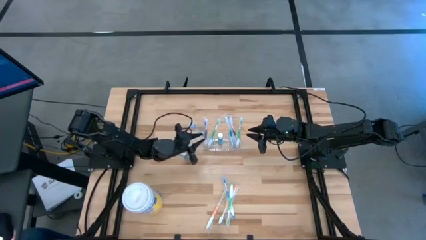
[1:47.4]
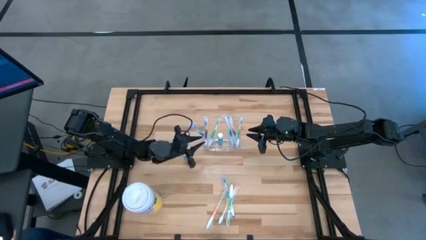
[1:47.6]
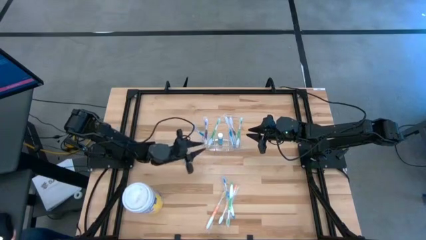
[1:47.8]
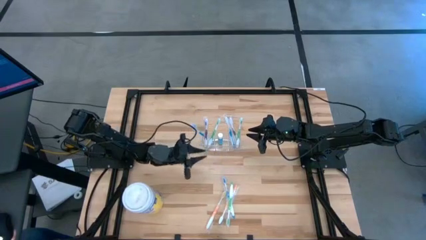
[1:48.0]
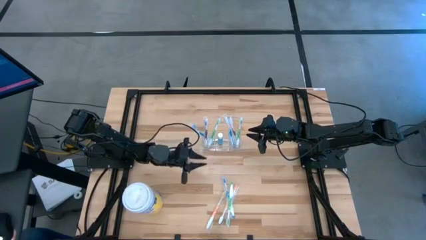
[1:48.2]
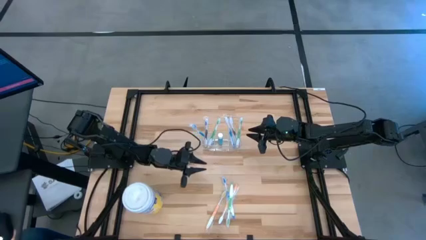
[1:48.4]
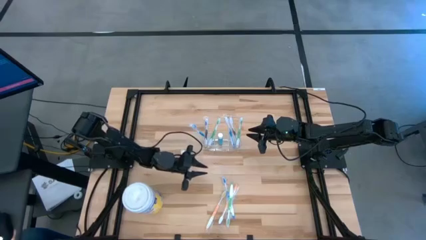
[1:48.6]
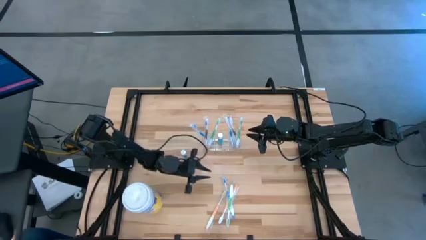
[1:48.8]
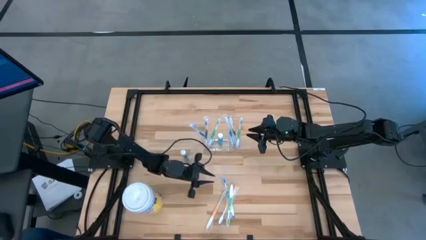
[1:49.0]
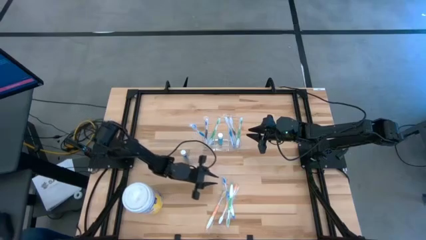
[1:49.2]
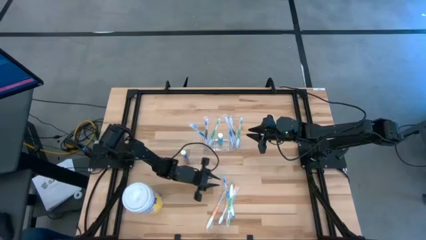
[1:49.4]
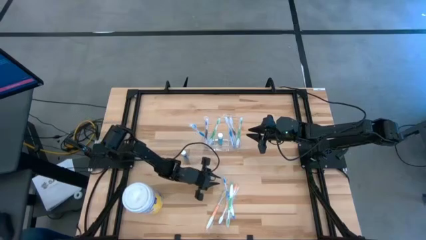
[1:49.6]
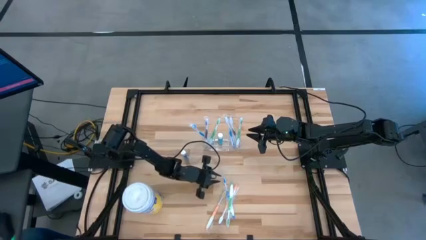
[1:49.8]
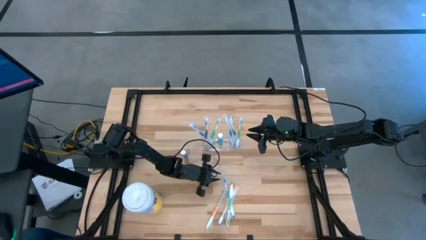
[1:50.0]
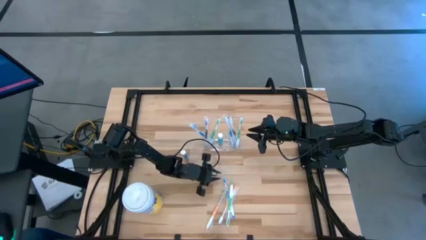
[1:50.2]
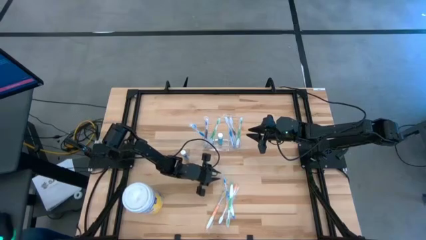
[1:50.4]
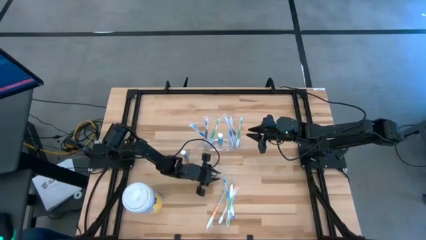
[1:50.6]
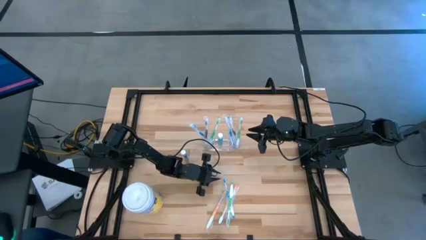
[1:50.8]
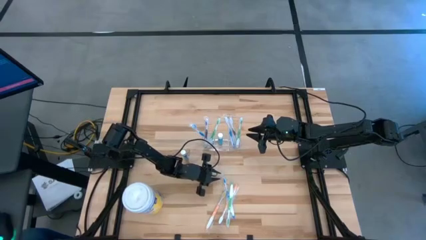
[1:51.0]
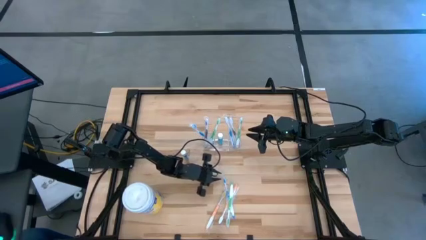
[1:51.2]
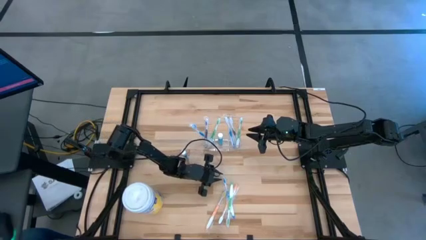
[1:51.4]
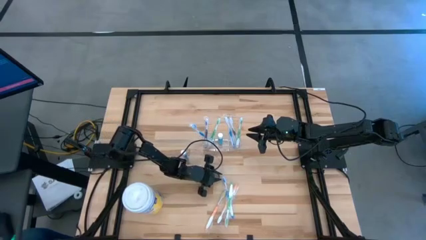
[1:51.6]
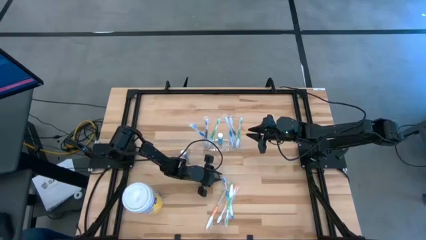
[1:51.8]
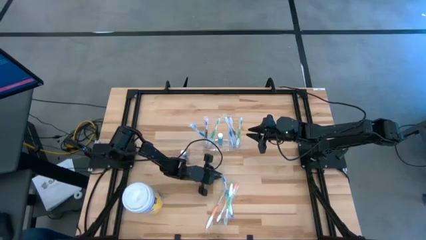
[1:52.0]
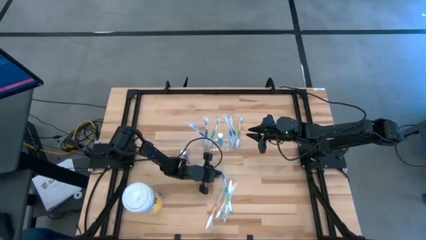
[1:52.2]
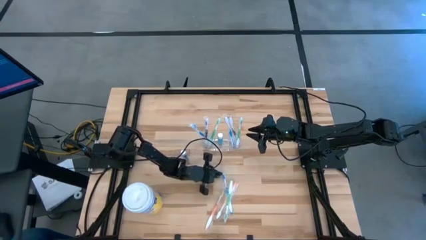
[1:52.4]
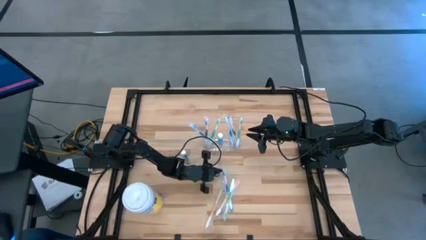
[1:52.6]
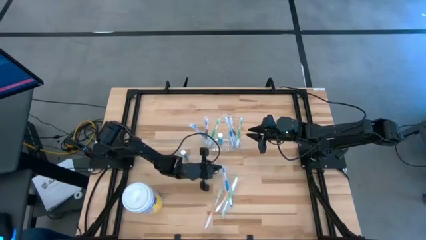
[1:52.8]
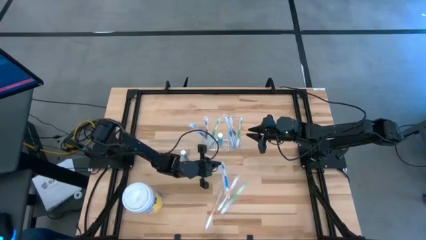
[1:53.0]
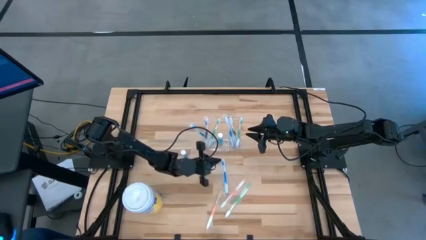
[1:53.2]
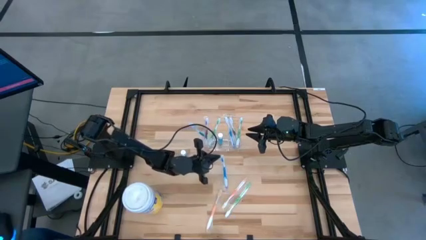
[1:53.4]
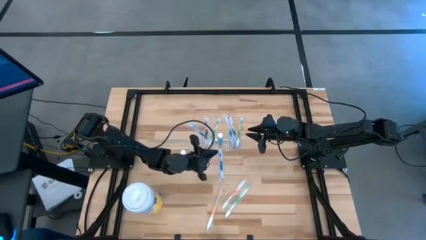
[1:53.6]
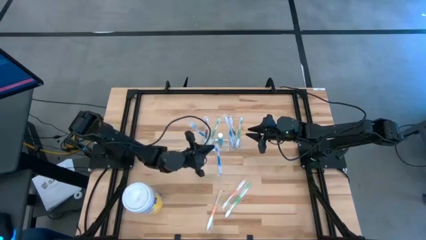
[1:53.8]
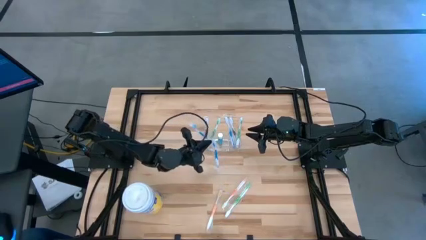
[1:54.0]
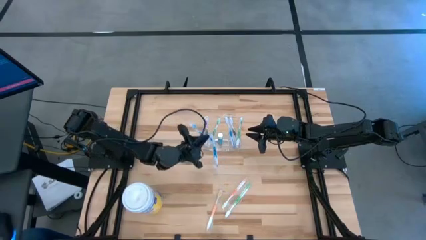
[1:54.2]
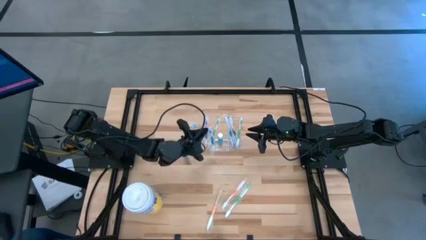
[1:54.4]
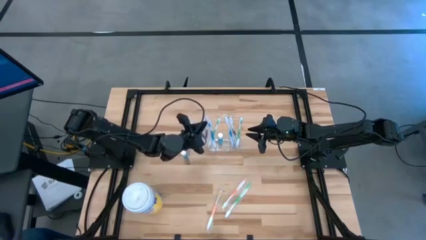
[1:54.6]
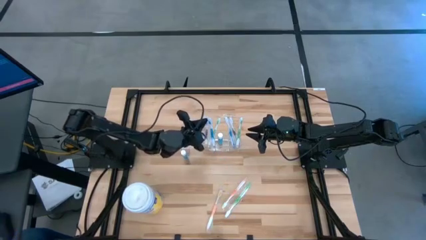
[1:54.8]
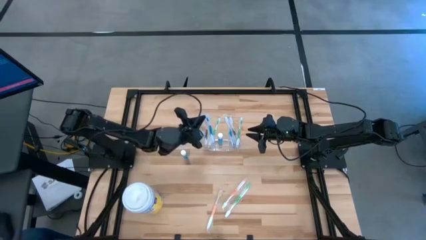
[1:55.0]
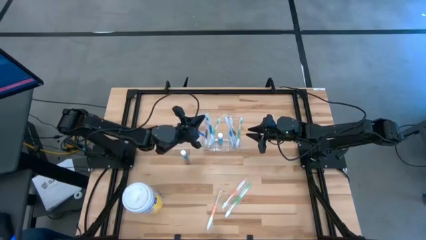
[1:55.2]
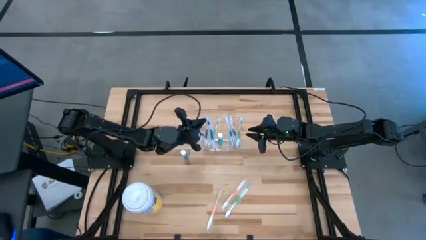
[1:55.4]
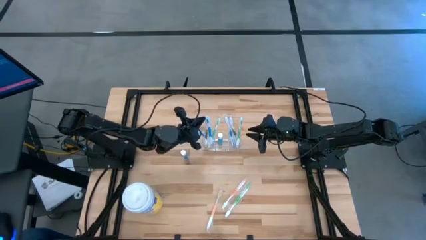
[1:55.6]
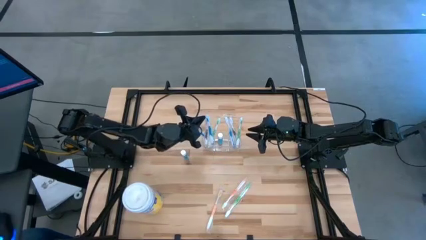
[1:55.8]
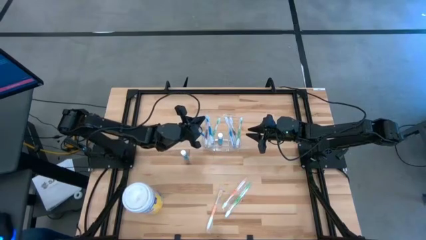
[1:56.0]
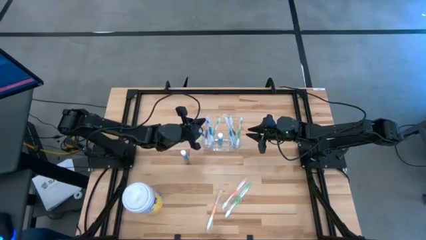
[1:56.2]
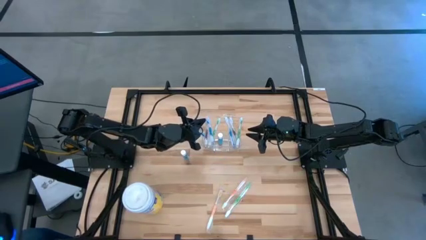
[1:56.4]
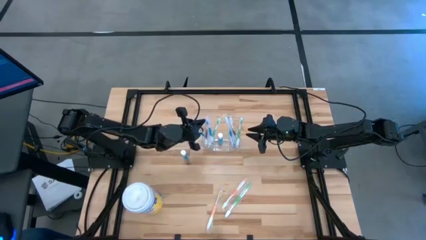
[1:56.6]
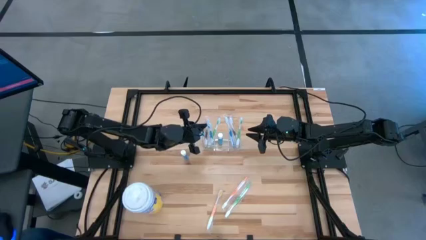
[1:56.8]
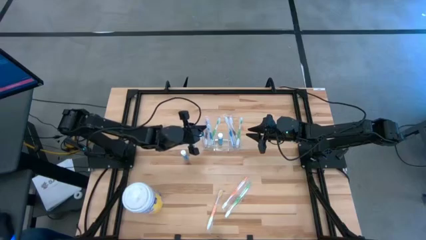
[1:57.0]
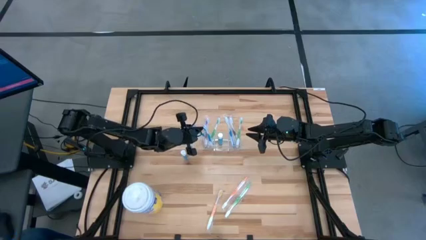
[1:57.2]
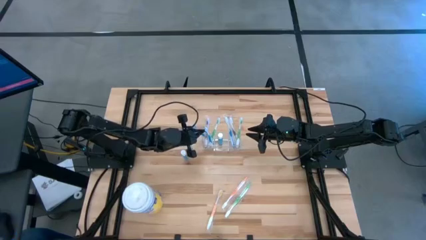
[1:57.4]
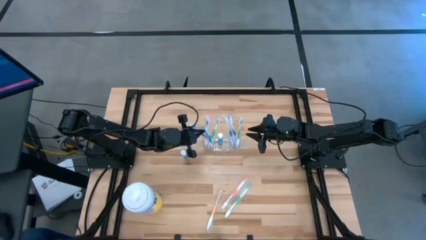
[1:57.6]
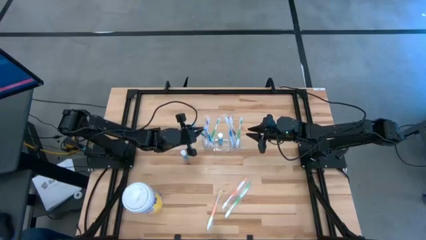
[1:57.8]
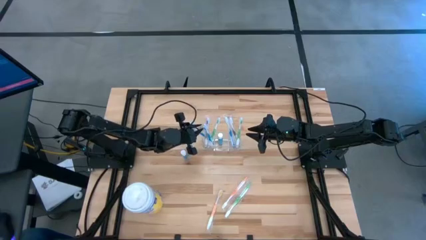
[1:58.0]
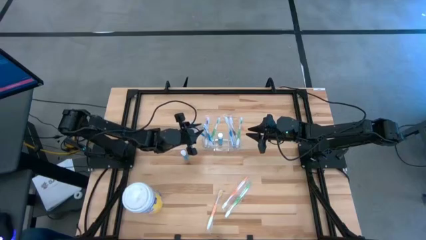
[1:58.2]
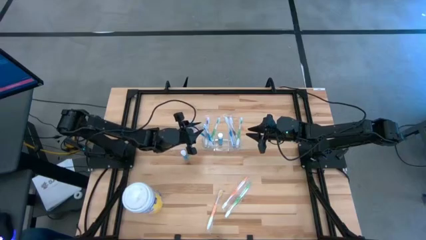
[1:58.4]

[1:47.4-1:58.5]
Task: Pick & Place toothbrushing station
Put the blue toothbrush into the transparent organizer

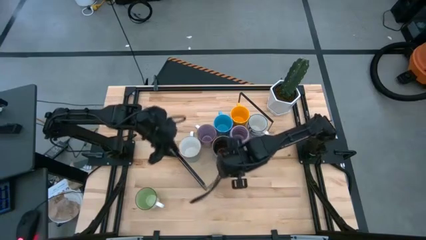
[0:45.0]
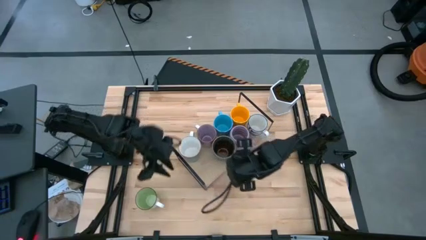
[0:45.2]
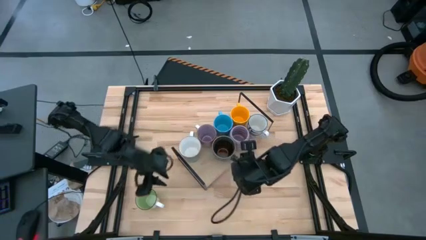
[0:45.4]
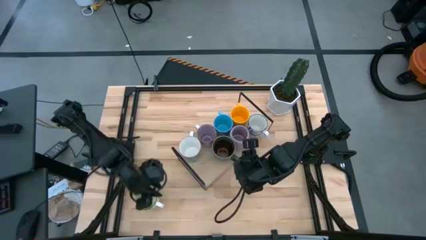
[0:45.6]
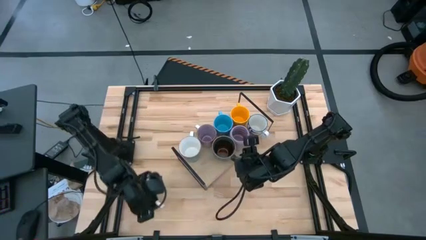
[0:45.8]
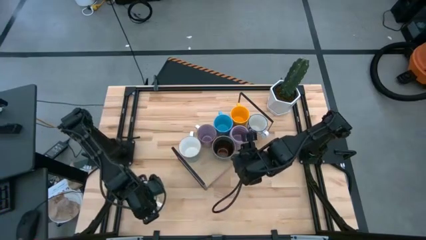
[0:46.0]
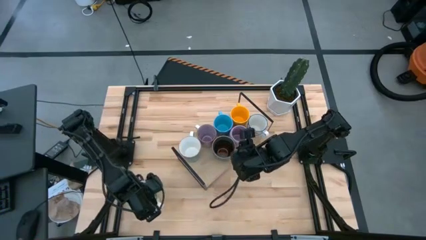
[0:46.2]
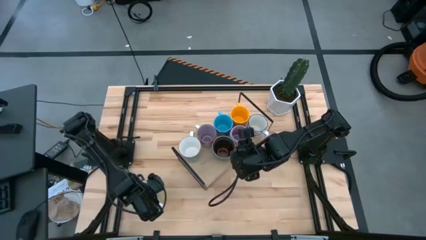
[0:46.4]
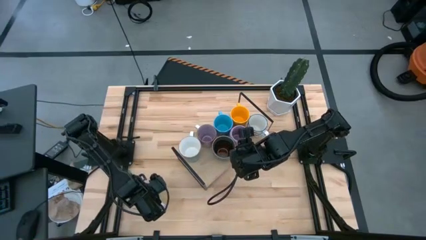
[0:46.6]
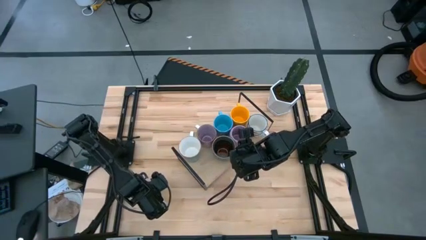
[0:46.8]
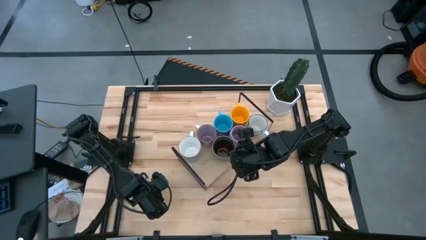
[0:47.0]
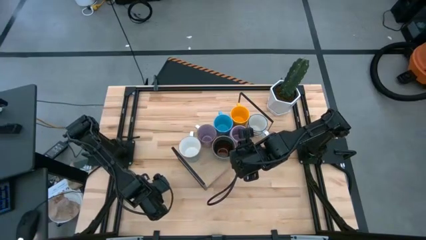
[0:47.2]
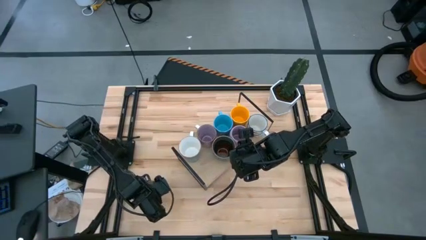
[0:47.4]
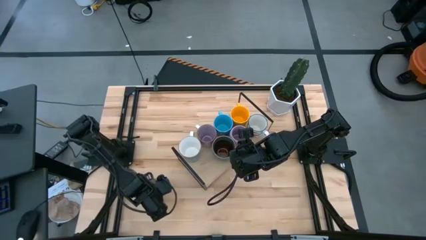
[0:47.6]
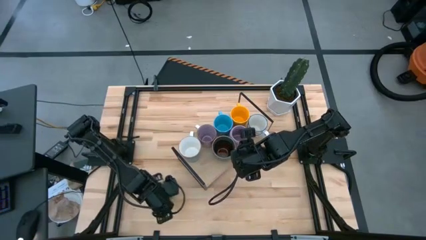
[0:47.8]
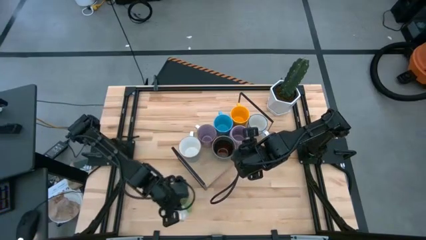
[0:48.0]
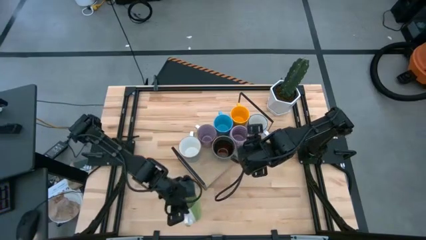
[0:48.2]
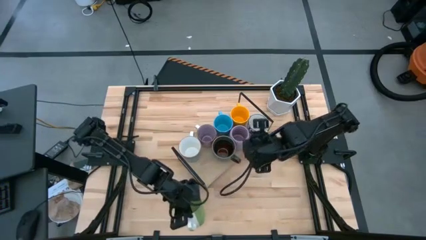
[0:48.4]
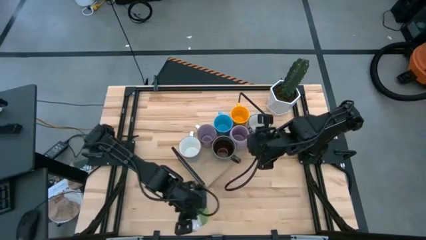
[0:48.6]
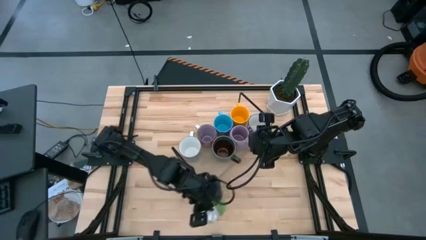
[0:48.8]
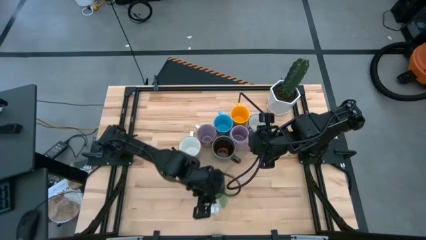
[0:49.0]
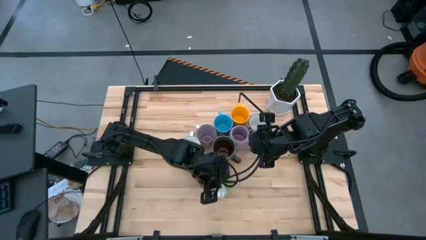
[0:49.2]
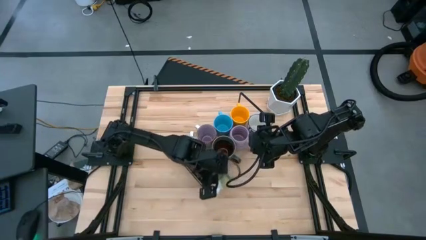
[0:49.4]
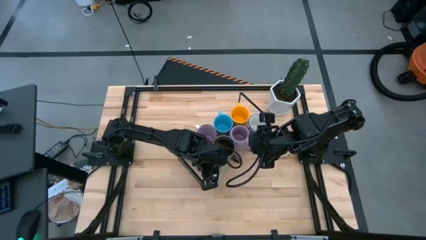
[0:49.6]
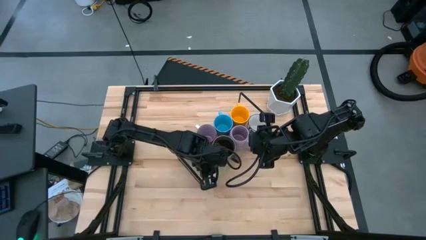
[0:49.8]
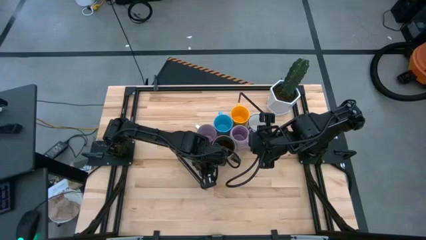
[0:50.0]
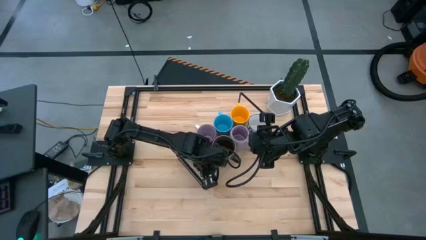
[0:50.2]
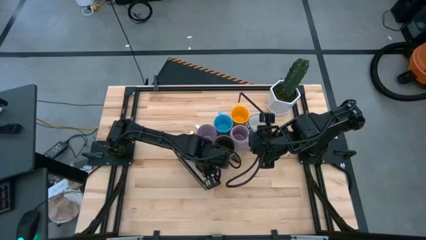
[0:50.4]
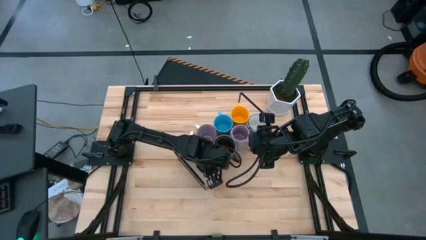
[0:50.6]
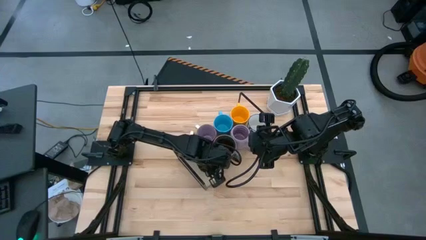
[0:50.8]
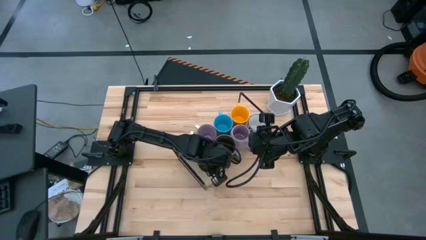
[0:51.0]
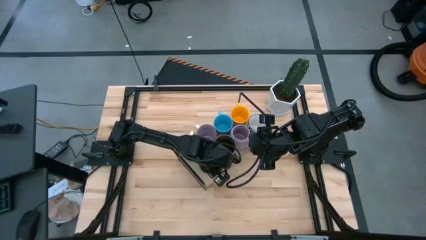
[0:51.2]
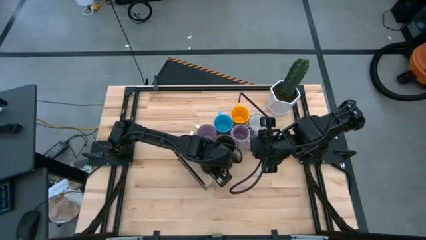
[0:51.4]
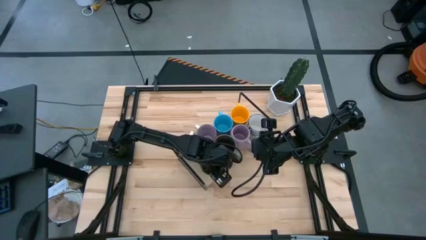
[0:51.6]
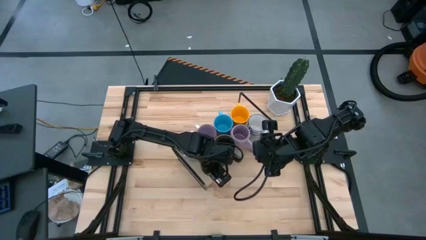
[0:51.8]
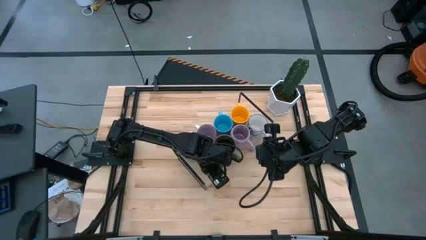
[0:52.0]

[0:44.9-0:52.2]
Task: Place coffee mugs
Put the green/brown mug onto the shelf
